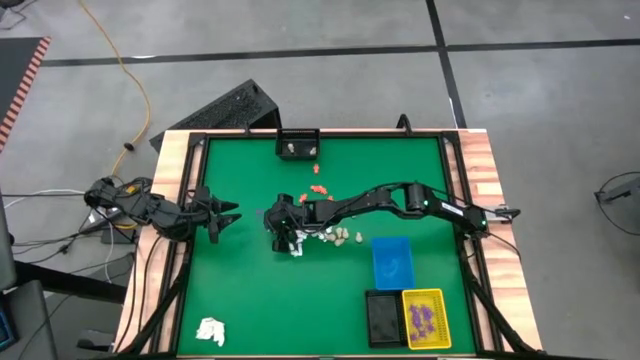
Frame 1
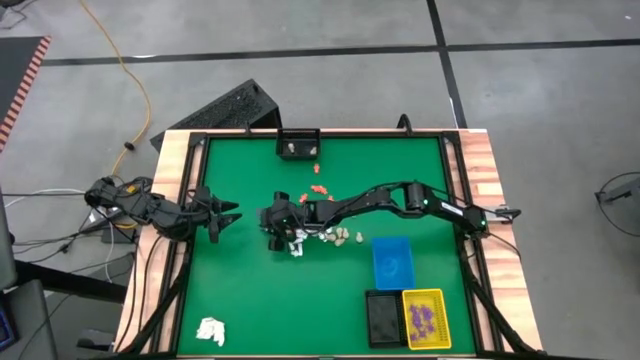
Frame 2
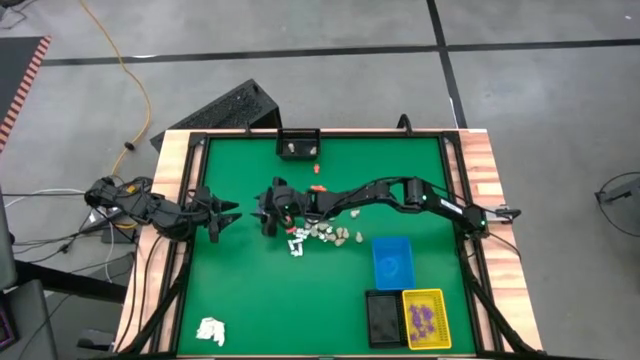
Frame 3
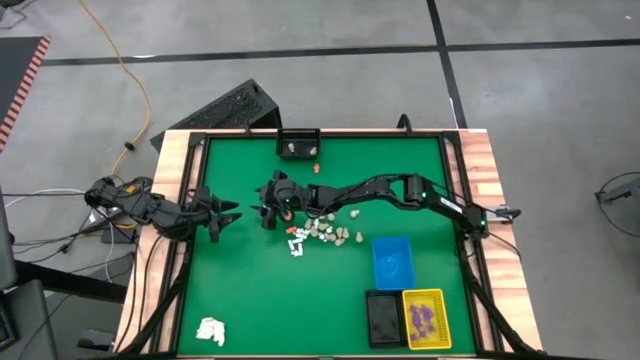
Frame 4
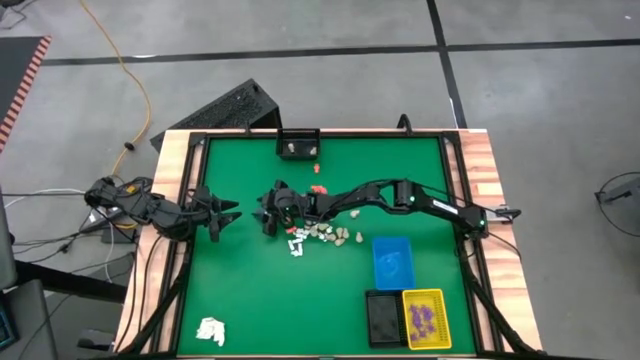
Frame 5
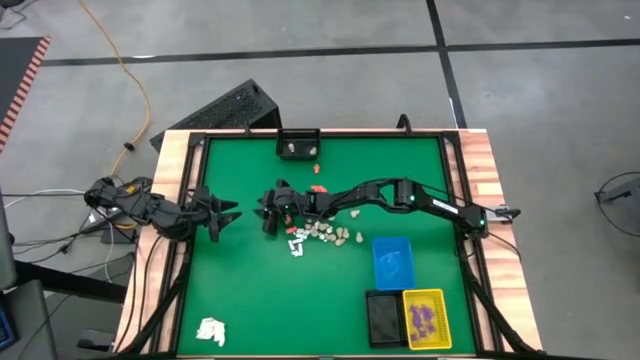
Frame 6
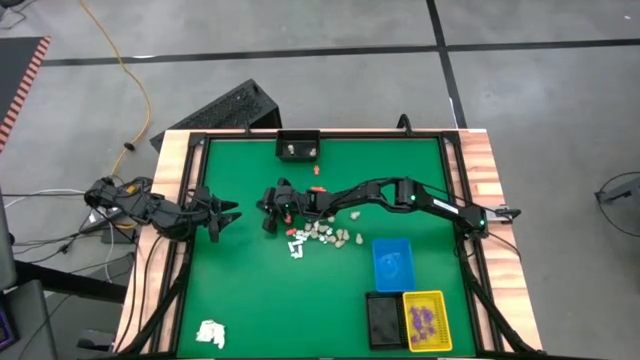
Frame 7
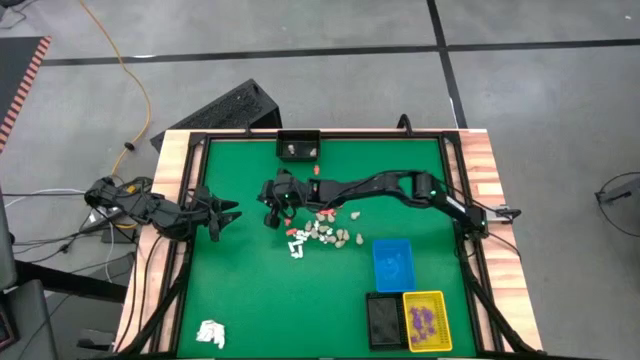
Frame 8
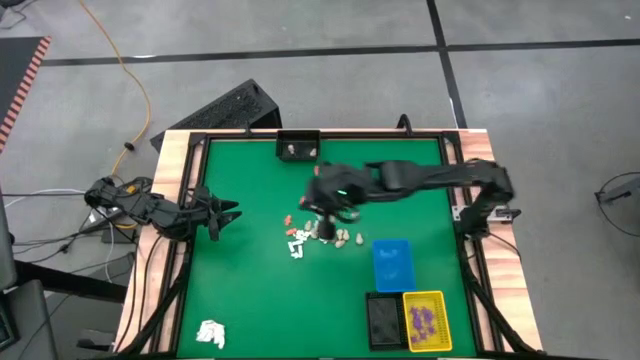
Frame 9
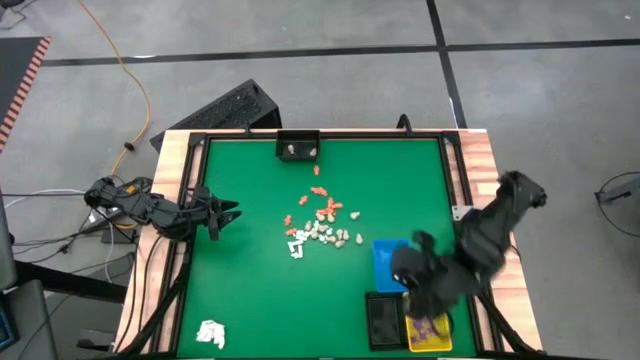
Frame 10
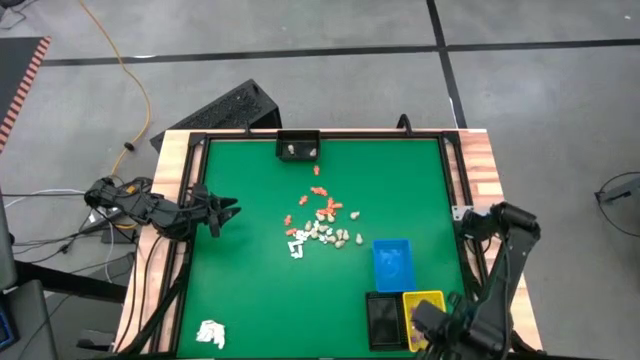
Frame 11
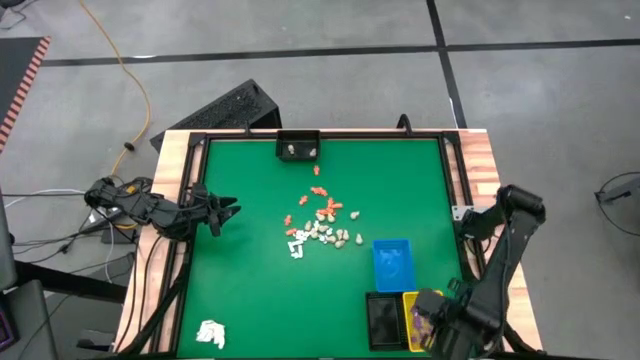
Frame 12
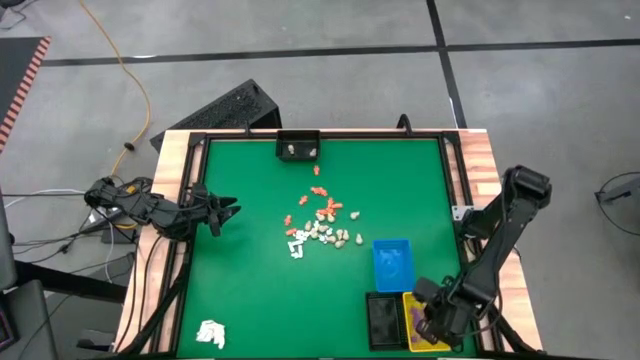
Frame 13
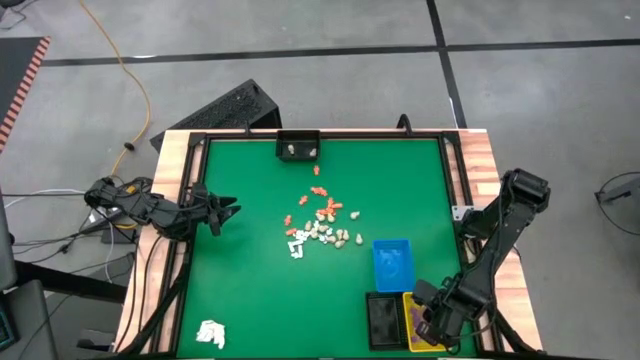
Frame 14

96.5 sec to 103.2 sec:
Task: Sort Halloween decoration
Put the purple spider toy into the yellow bin

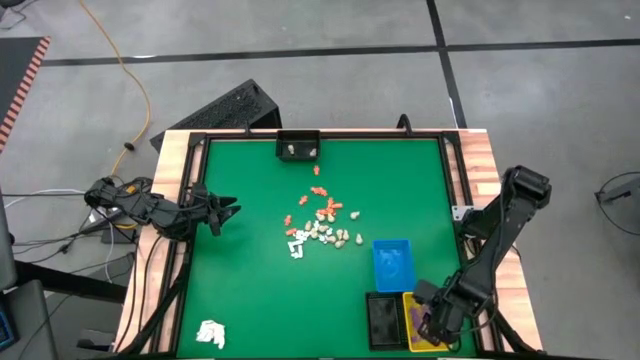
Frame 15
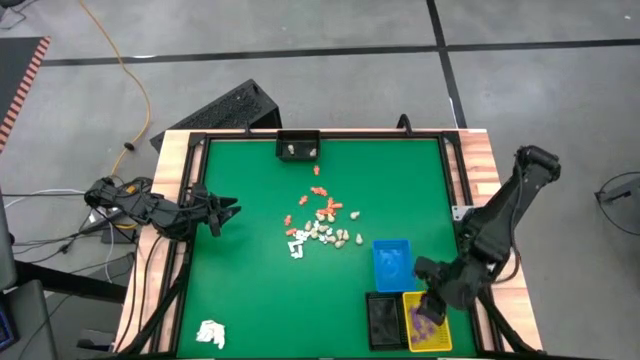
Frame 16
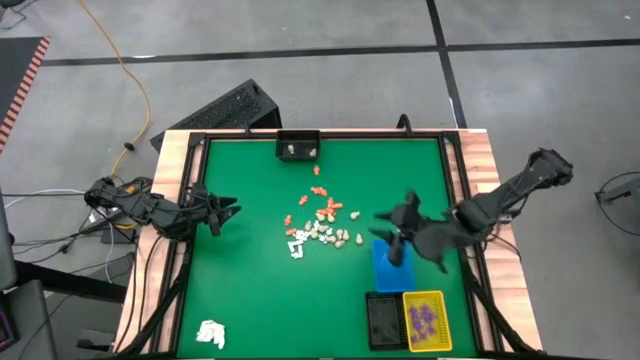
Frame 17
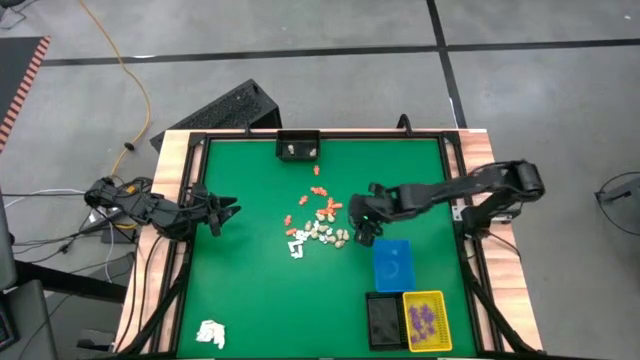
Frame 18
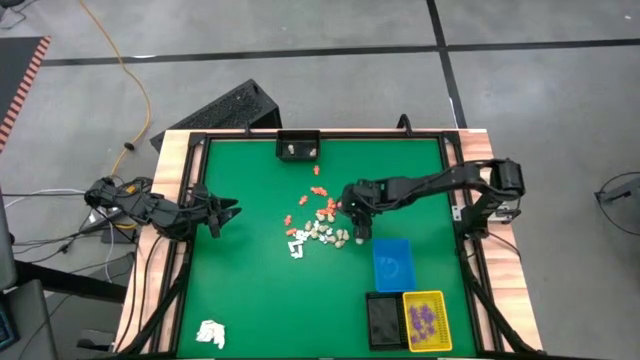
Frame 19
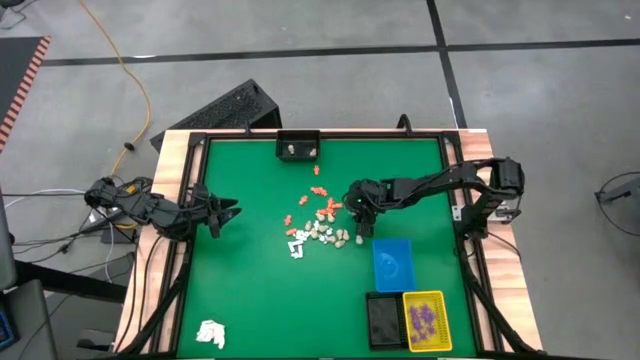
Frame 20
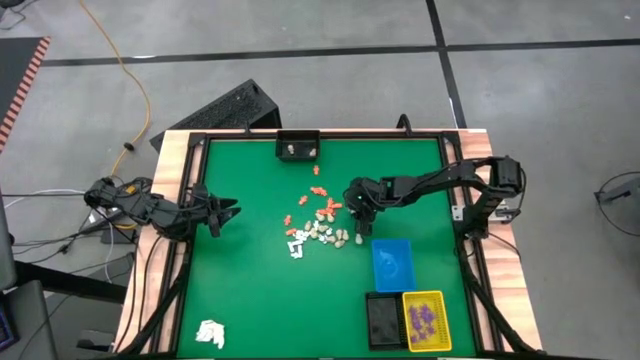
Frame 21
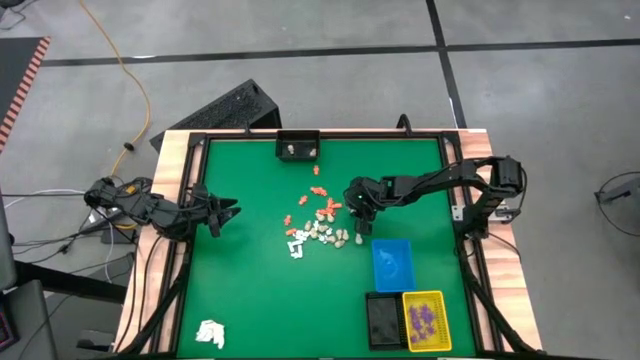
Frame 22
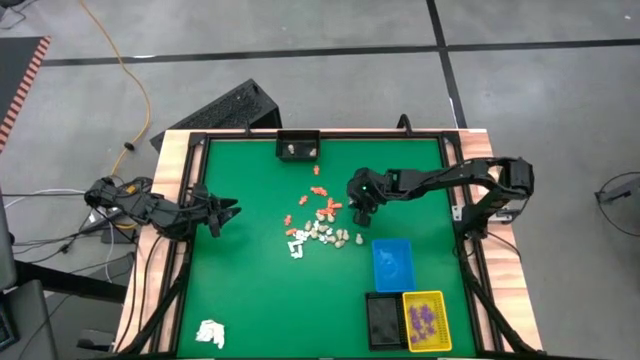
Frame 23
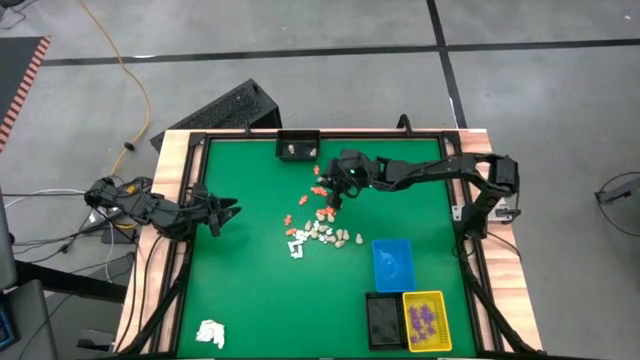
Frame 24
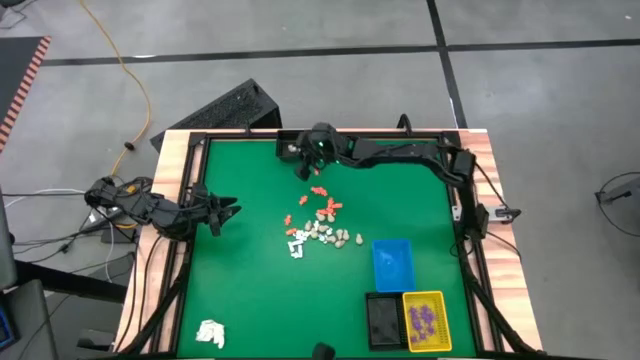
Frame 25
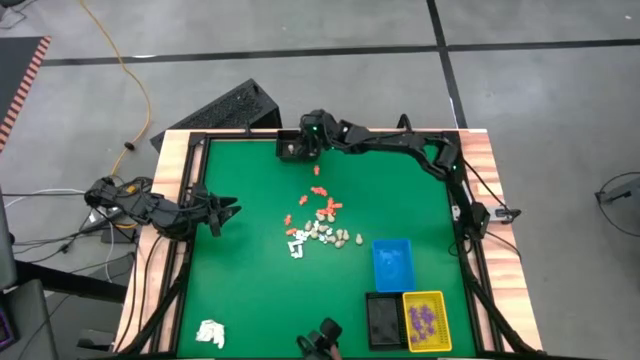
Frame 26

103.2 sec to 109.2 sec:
Put the gray skull toy into the top black bin

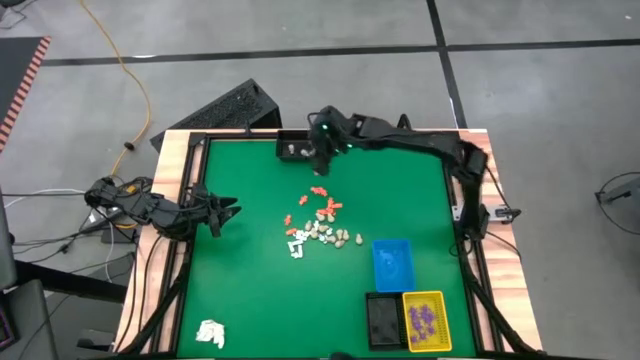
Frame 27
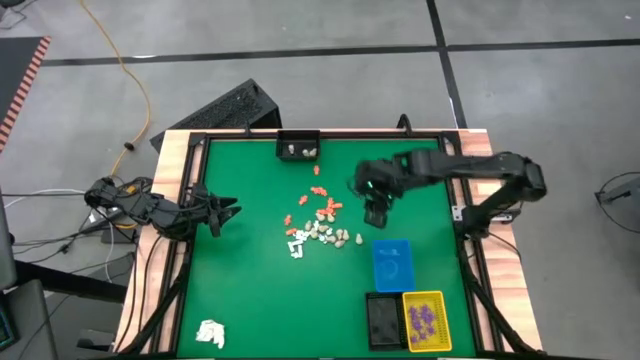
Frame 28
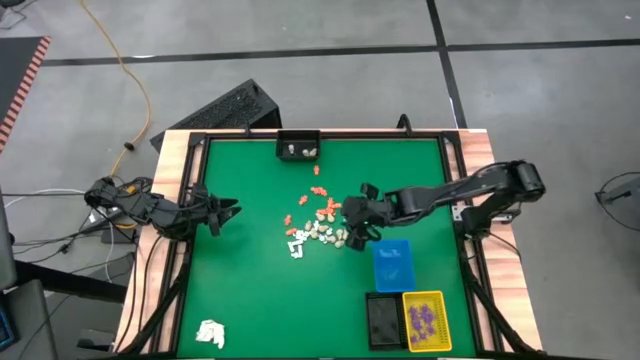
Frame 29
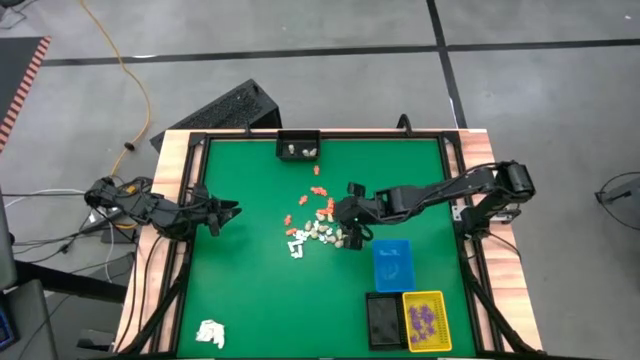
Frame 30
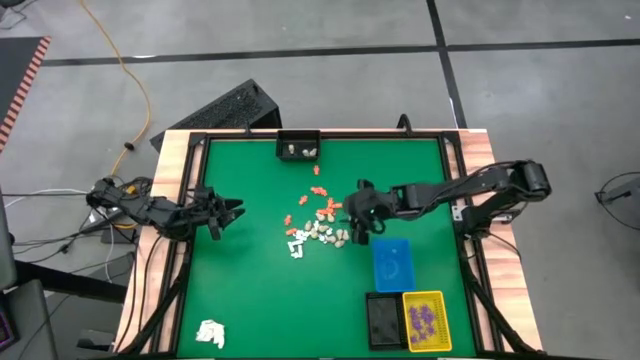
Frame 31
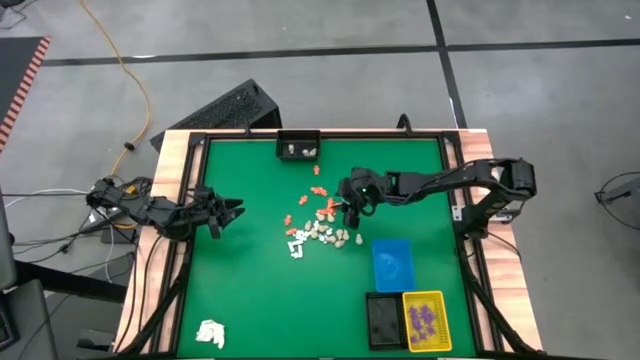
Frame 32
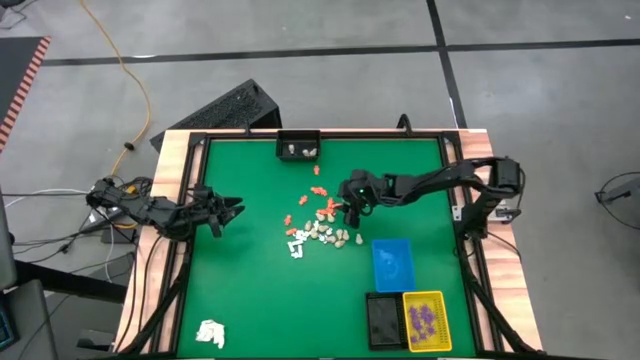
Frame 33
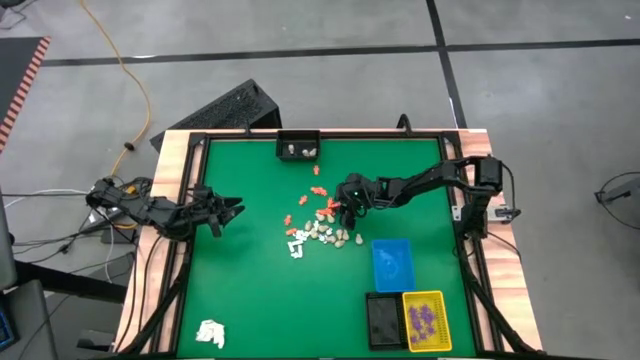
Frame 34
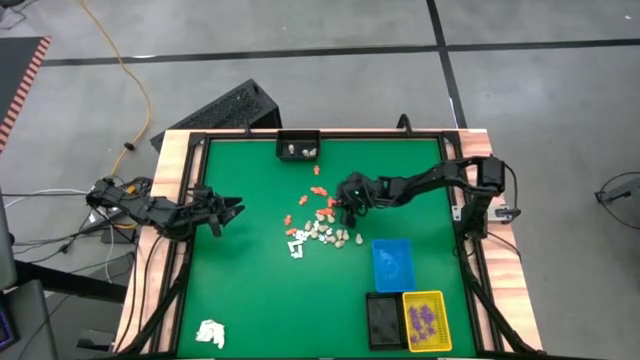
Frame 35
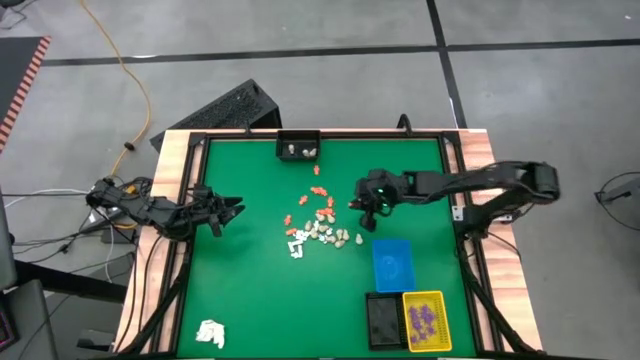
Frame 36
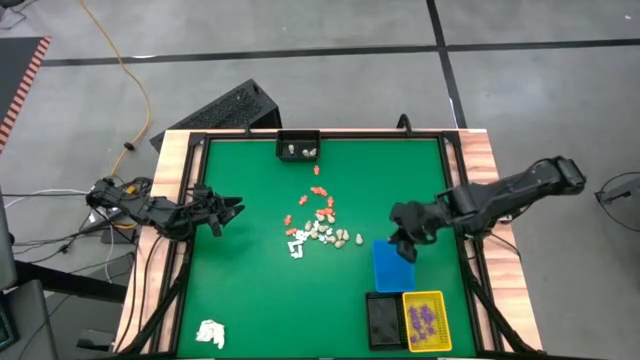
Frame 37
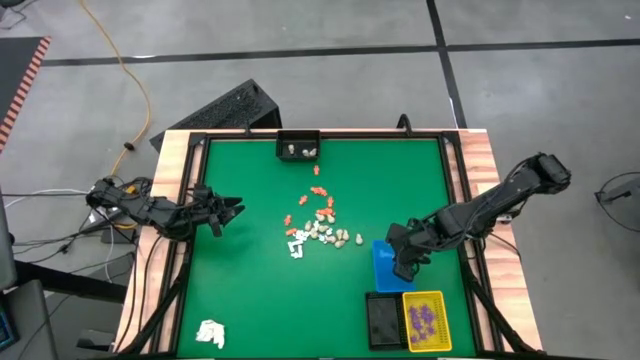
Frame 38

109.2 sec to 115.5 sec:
Put the orange skeleton toy into the blue bin

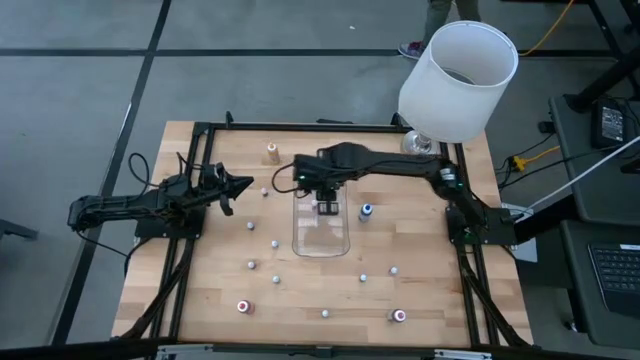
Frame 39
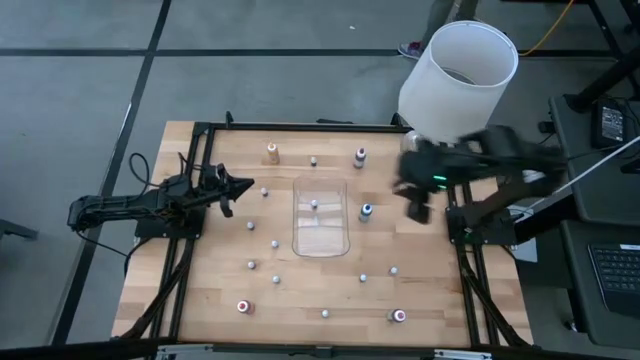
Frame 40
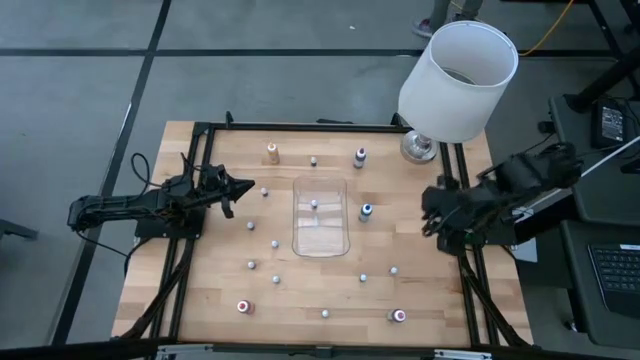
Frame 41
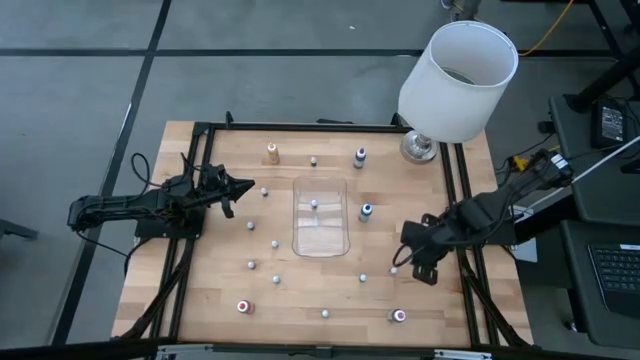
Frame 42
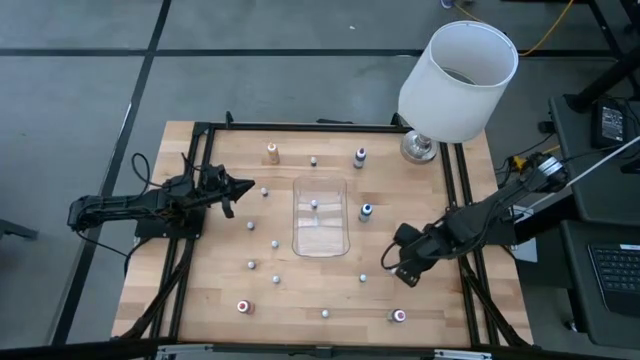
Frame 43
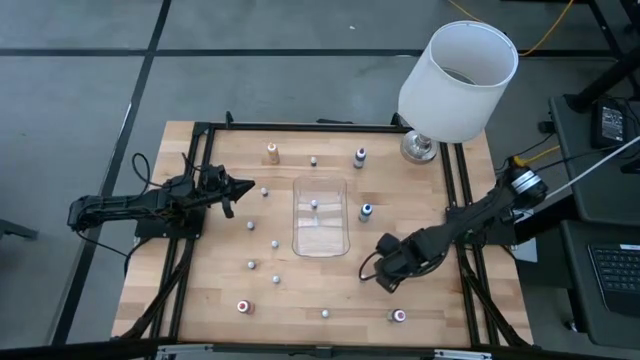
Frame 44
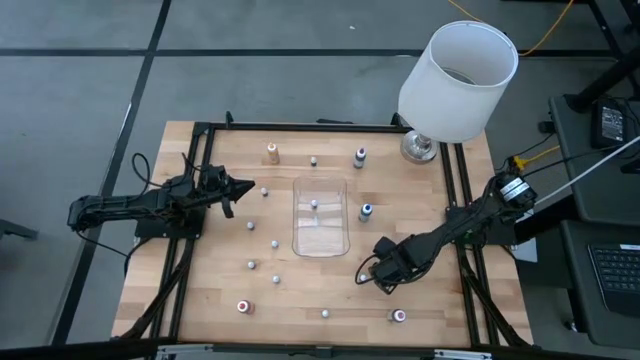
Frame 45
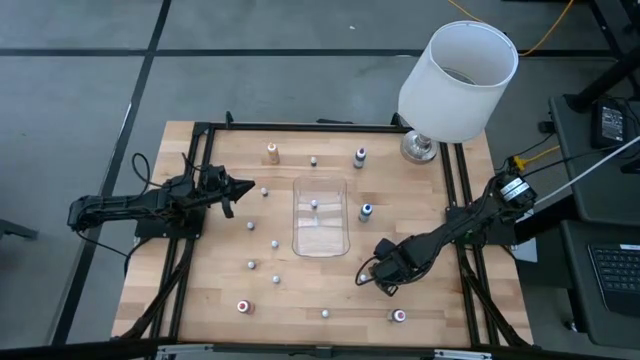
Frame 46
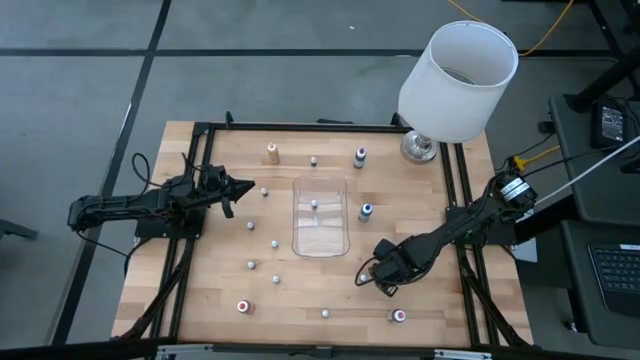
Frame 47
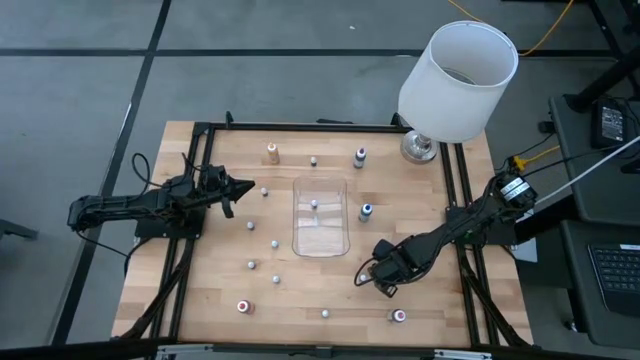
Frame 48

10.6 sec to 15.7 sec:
Task: Pick & Place food coloring
Put the small red coloring into the transparent bin
